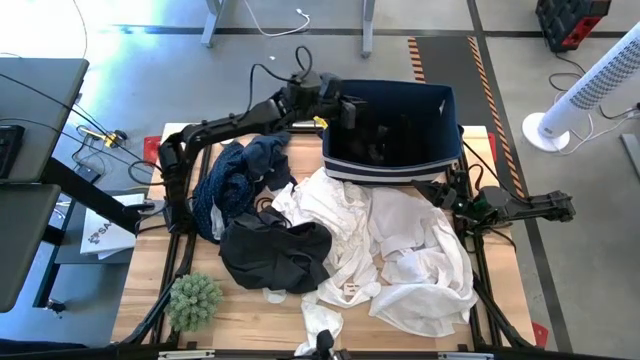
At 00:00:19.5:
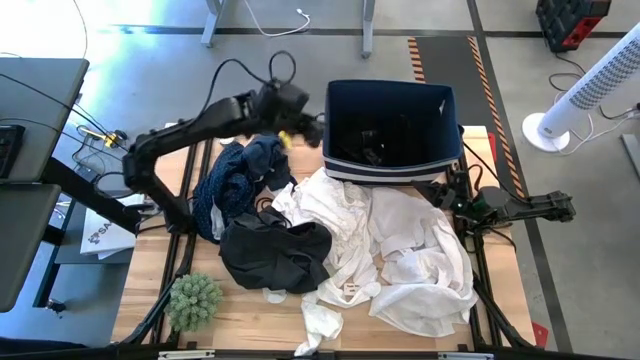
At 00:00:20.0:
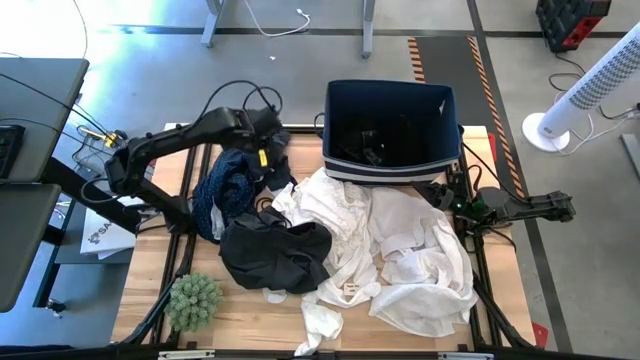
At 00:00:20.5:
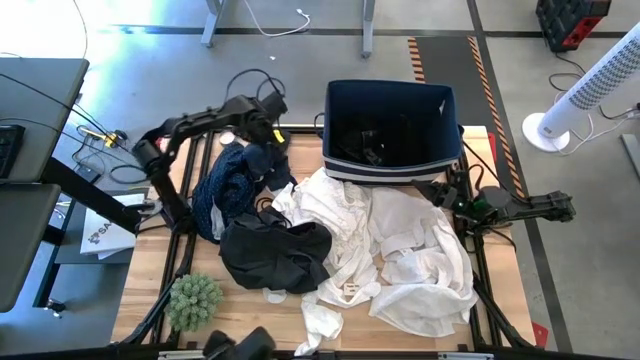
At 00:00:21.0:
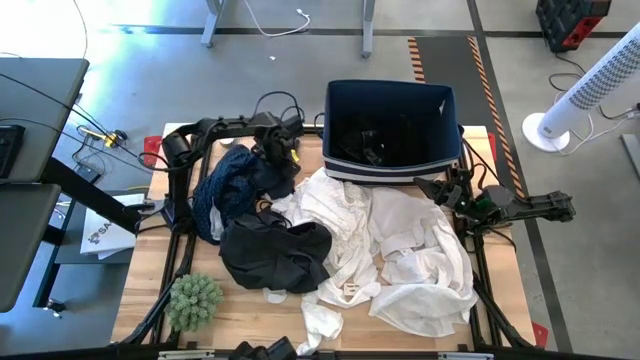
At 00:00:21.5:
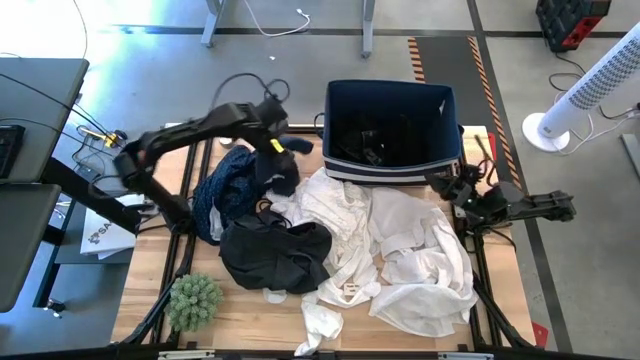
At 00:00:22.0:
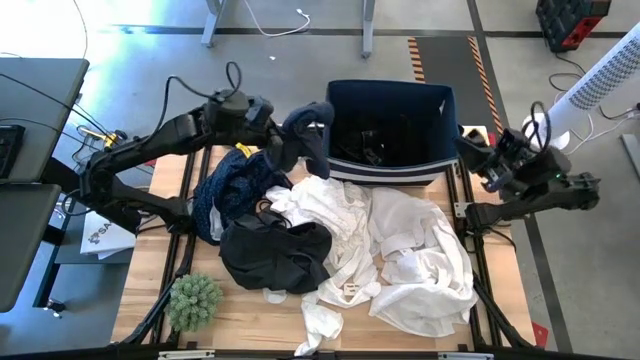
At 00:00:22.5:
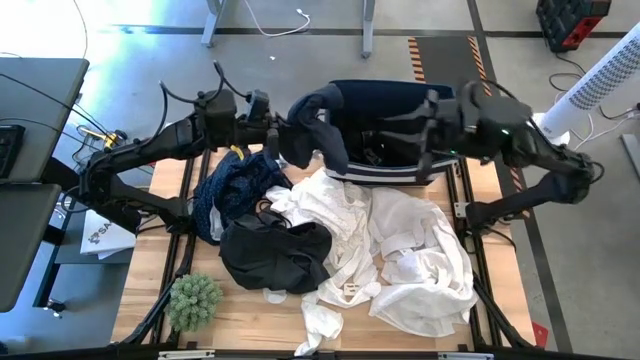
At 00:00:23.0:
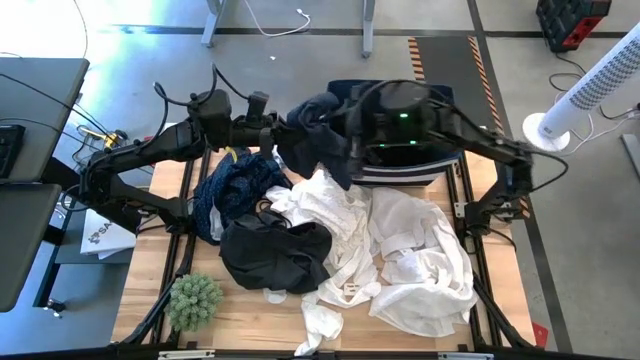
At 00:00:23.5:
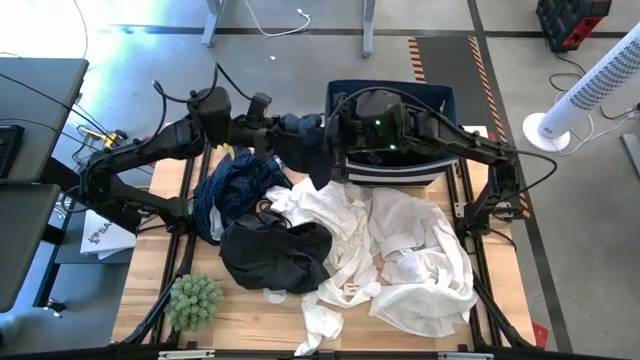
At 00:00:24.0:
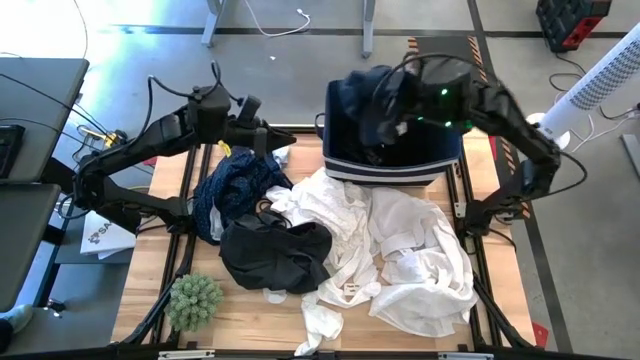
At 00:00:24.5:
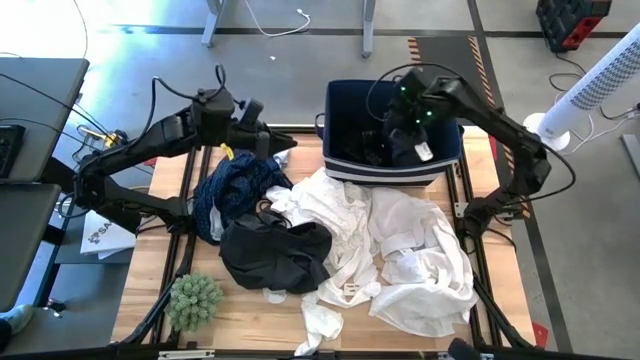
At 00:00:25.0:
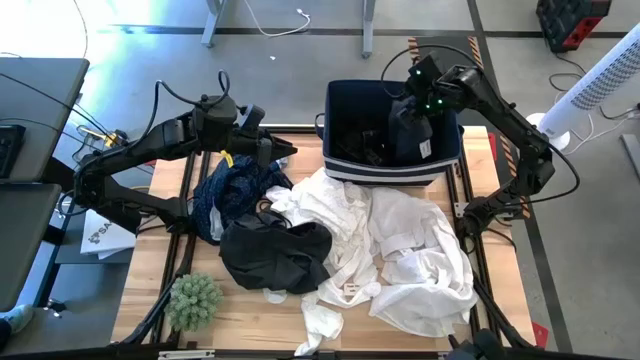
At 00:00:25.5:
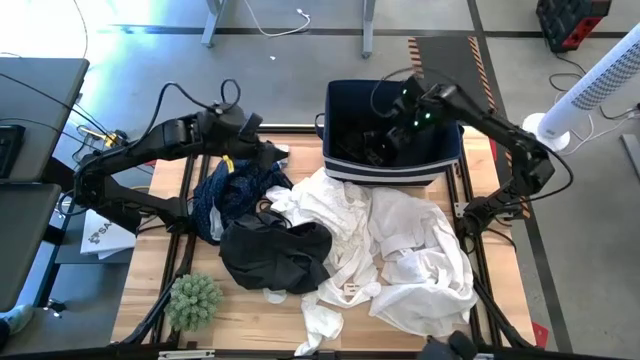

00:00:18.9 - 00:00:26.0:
Task: Sort clothes
Put the blue longsleeve into the blue laundry organizer

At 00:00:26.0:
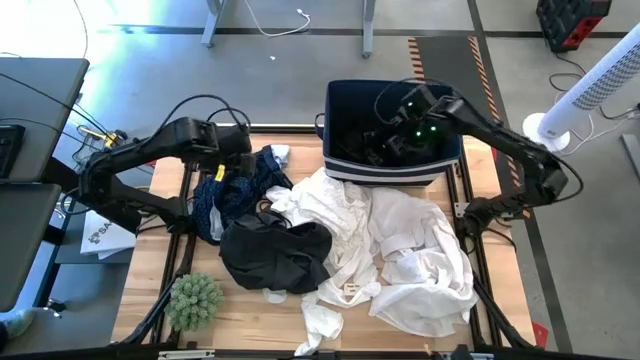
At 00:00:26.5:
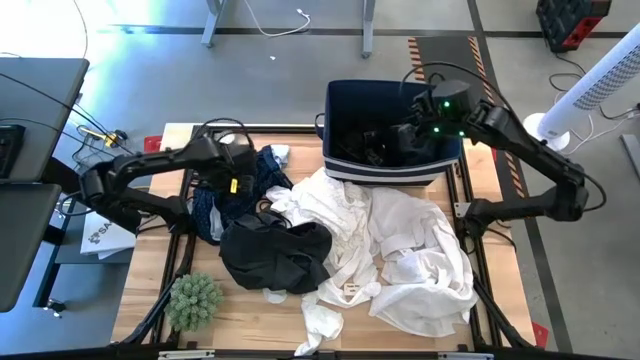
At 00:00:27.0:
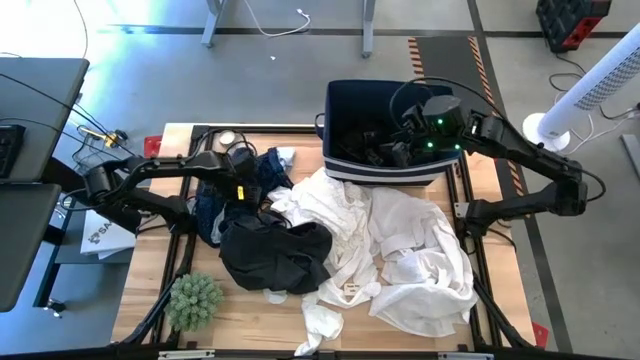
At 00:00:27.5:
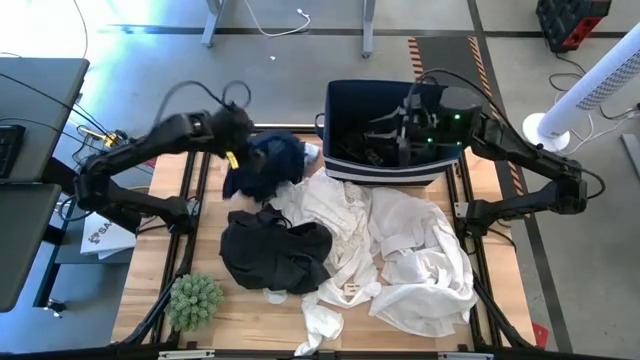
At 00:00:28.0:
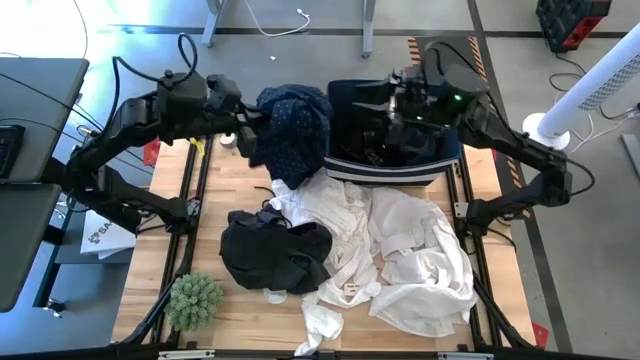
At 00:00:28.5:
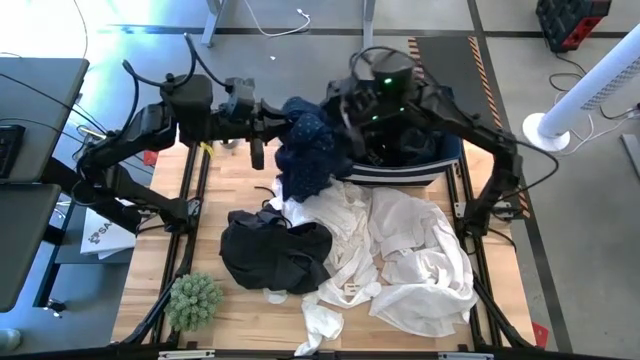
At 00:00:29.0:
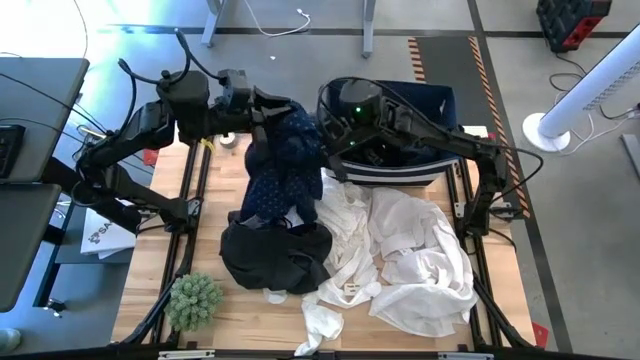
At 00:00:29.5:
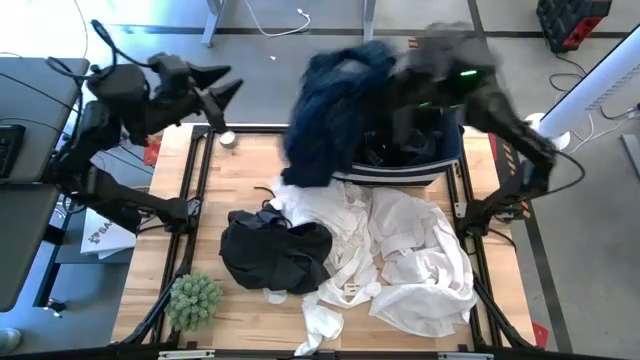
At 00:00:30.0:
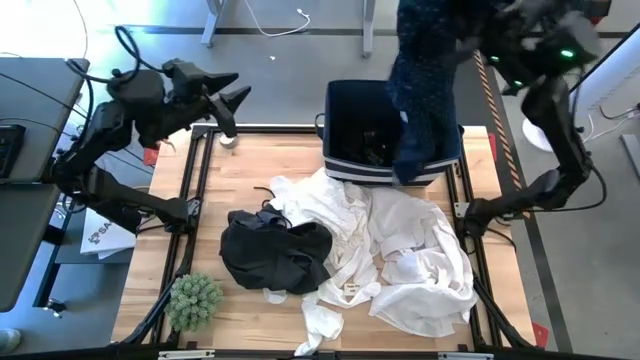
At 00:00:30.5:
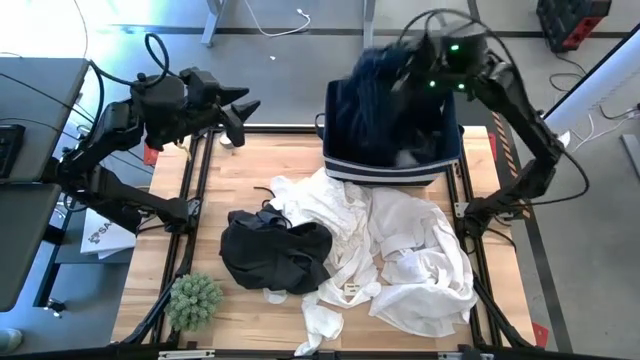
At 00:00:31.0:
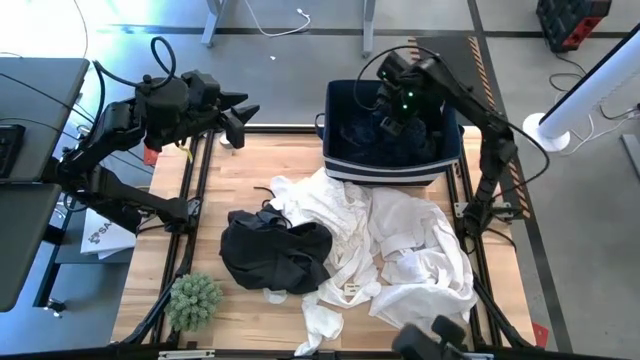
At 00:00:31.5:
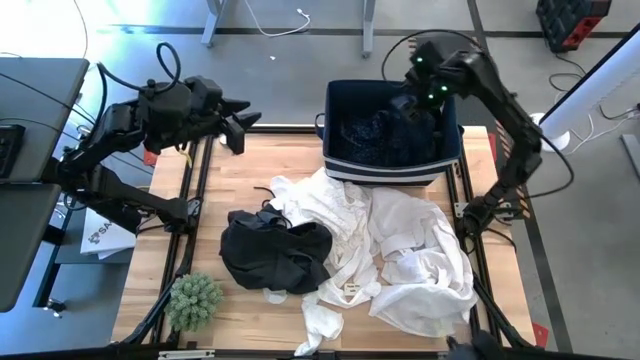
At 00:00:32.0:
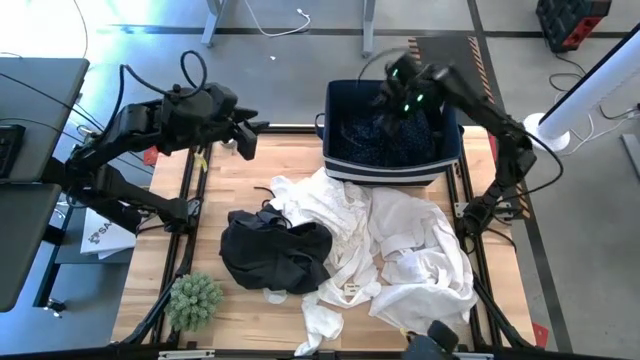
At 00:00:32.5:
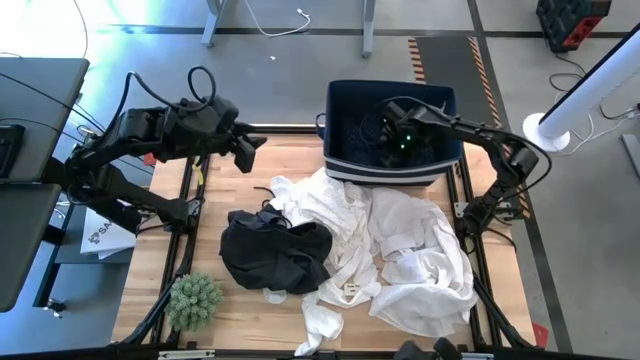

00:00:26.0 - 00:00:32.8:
Put the blue polo into the blue laundry organizer

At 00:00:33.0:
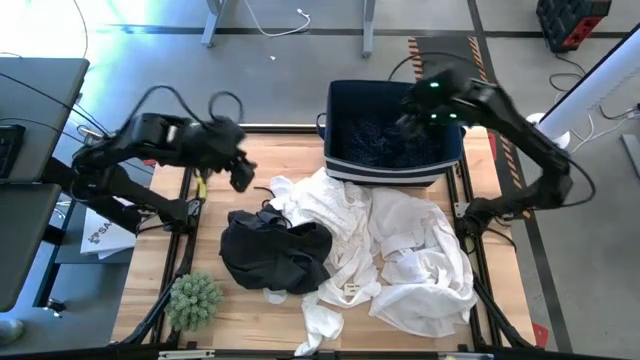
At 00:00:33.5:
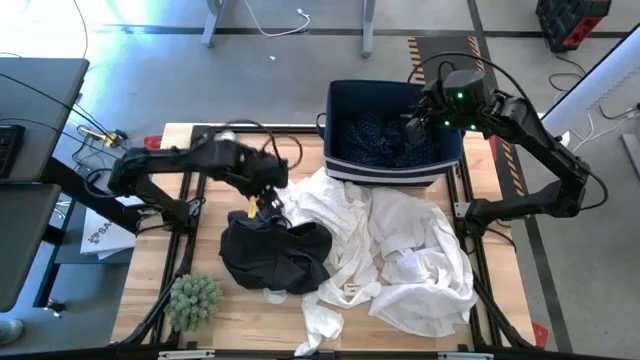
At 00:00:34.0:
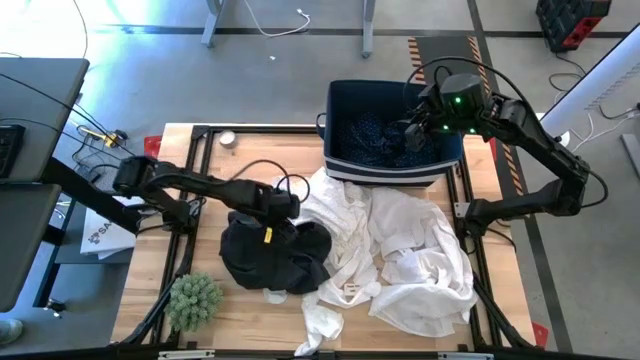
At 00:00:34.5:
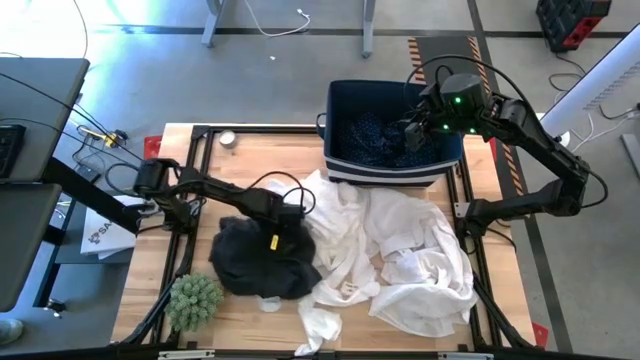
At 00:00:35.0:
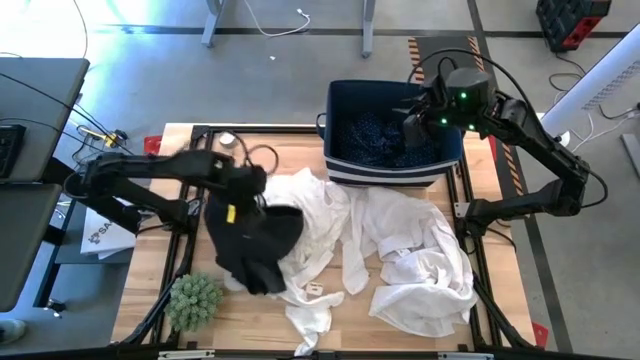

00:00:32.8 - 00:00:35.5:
Put the black shorts into the blue laundry organizer

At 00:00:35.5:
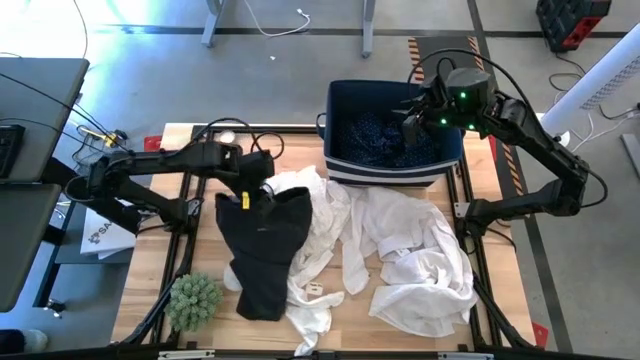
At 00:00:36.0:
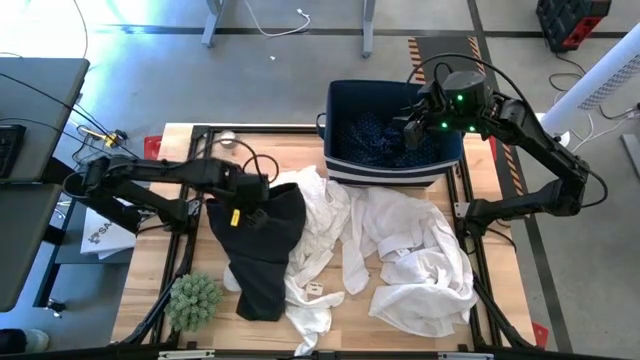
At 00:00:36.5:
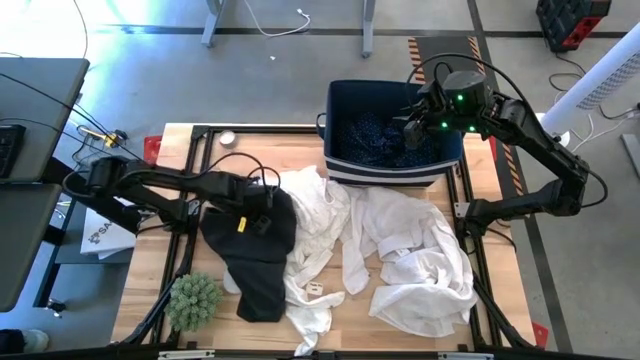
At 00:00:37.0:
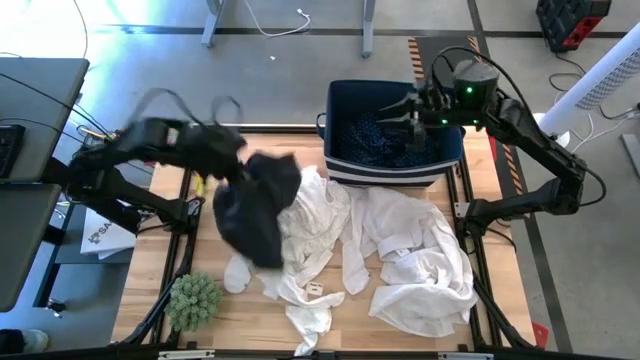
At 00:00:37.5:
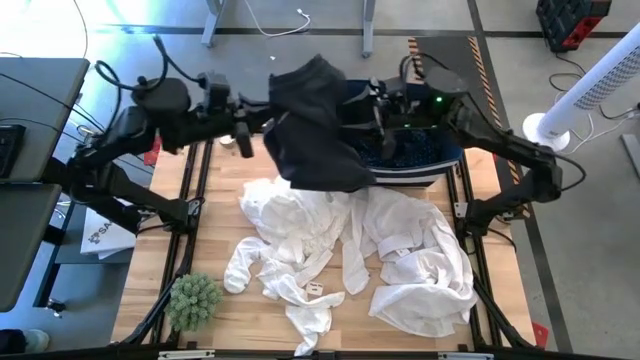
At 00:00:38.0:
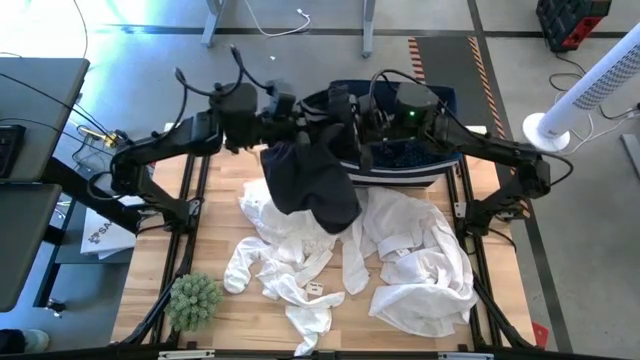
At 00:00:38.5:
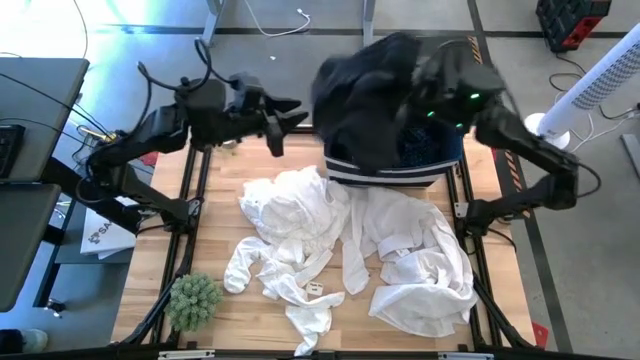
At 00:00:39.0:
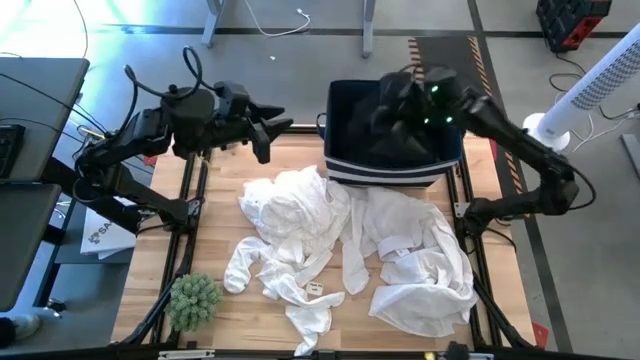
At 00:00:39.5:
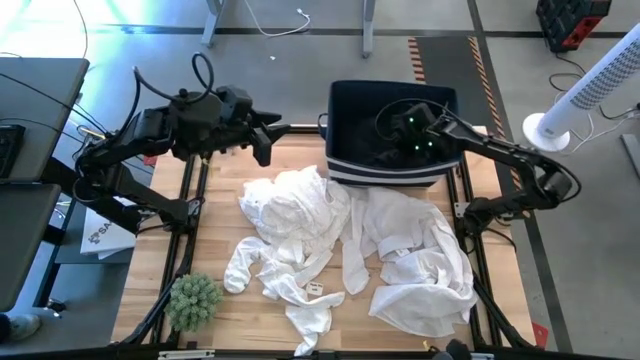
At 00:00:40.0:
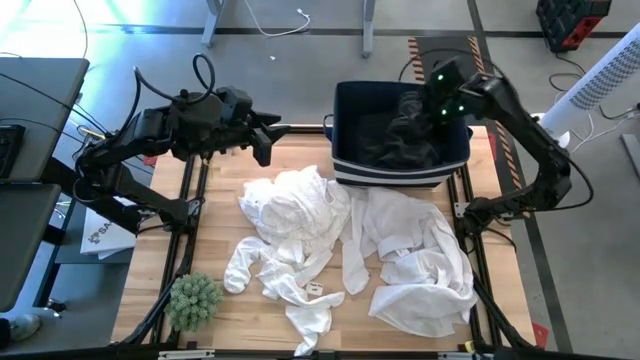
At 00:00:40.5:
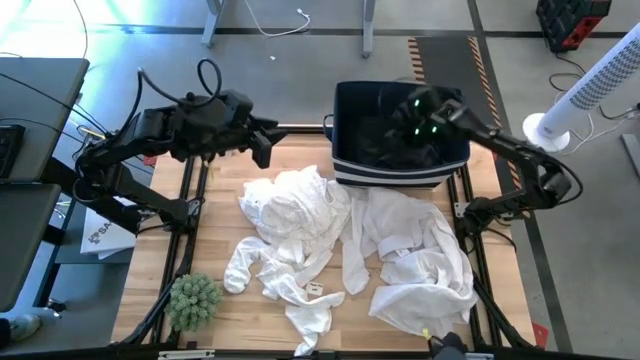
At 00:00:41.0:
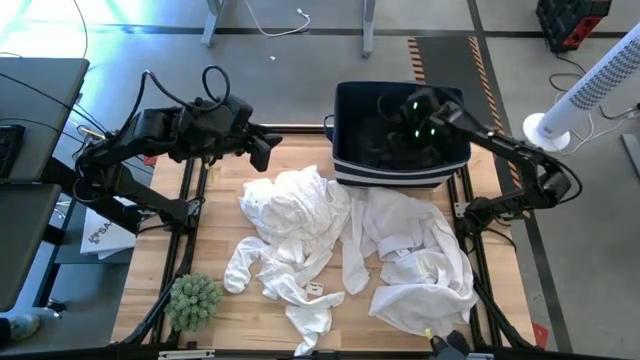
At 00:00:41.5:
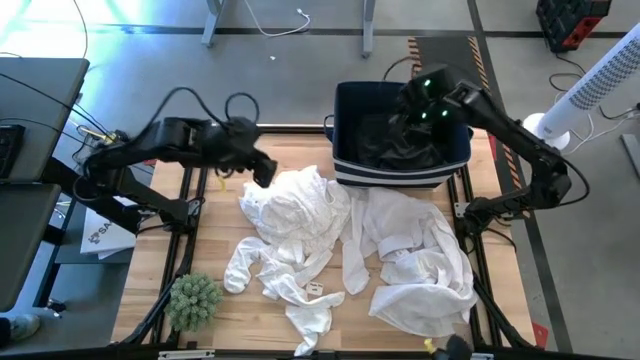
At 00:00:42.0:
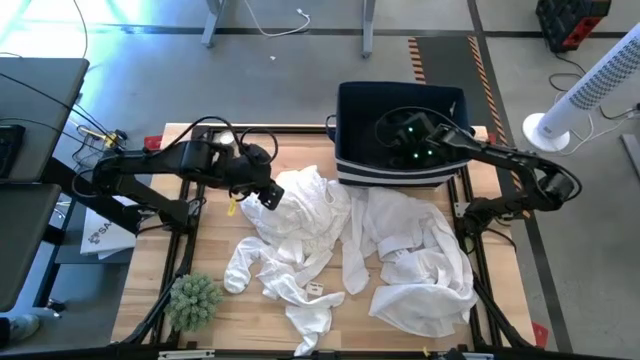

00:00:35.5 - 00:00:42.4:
Put the black shorts into the blue laundry organizer
